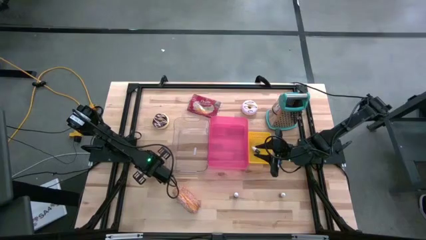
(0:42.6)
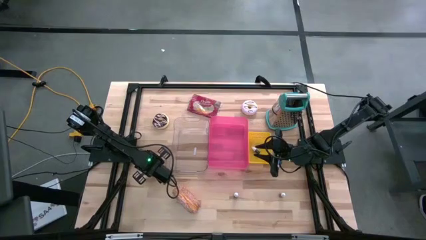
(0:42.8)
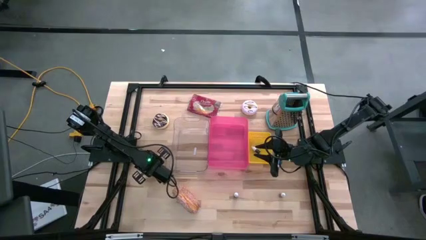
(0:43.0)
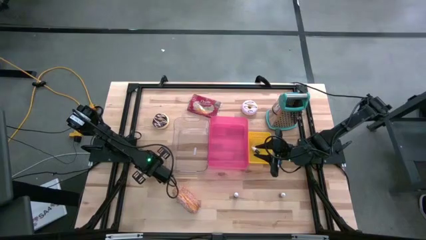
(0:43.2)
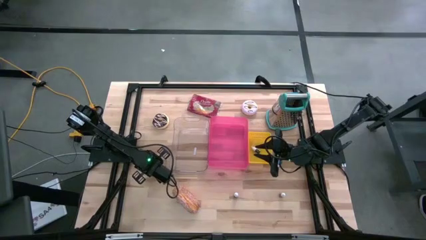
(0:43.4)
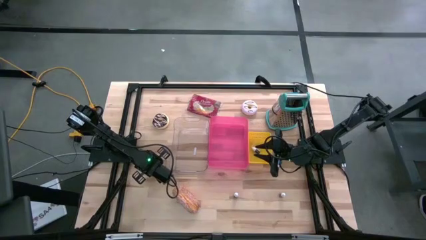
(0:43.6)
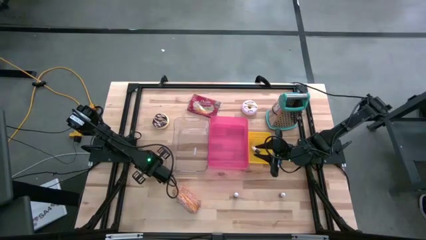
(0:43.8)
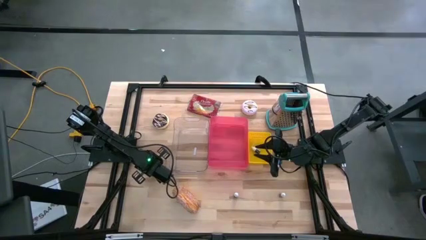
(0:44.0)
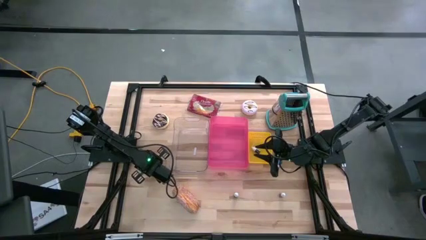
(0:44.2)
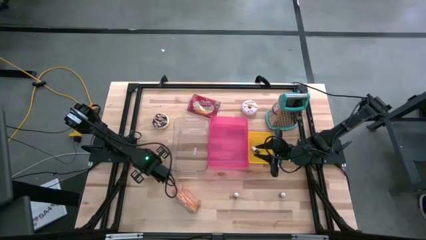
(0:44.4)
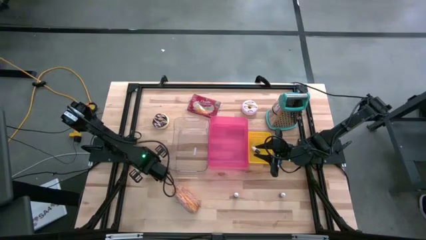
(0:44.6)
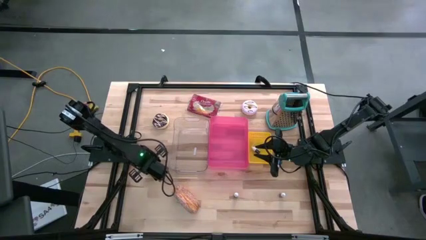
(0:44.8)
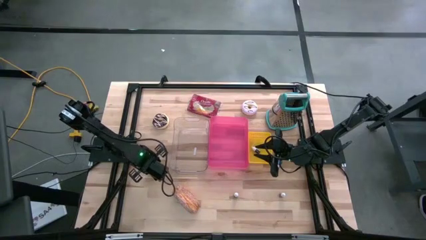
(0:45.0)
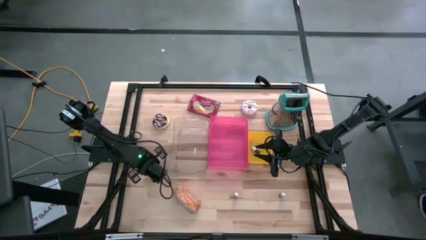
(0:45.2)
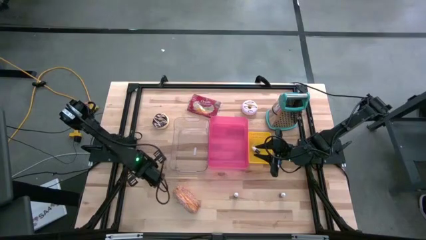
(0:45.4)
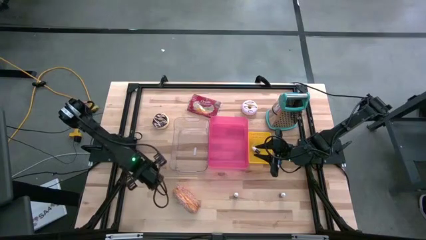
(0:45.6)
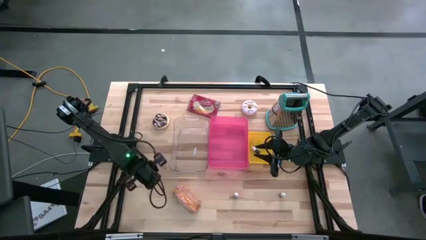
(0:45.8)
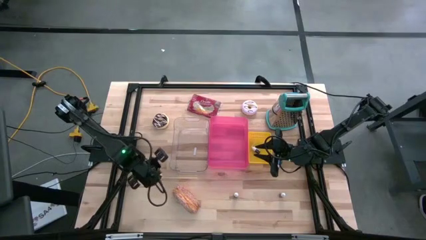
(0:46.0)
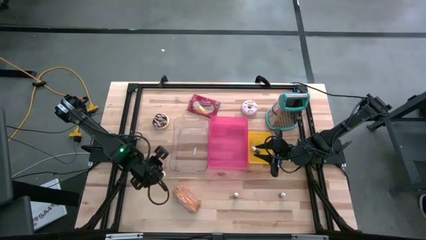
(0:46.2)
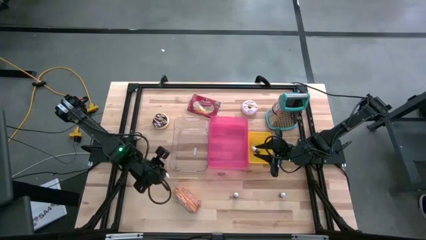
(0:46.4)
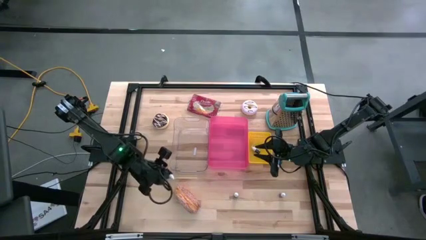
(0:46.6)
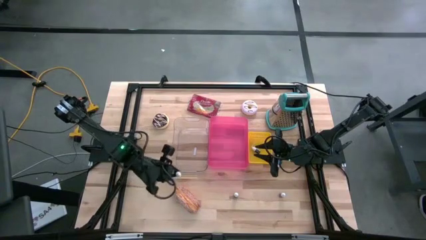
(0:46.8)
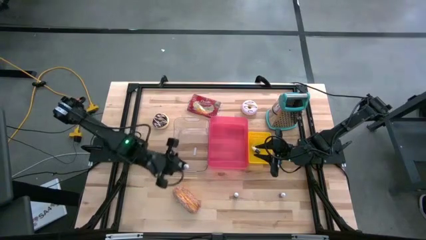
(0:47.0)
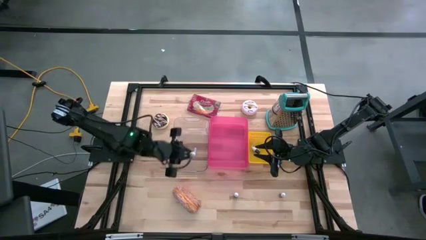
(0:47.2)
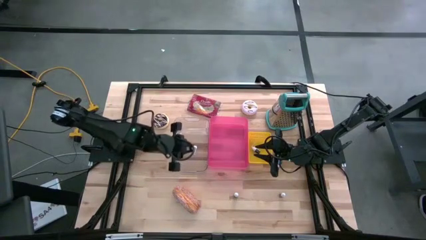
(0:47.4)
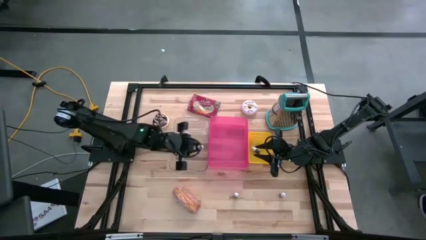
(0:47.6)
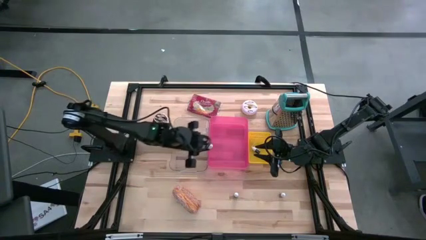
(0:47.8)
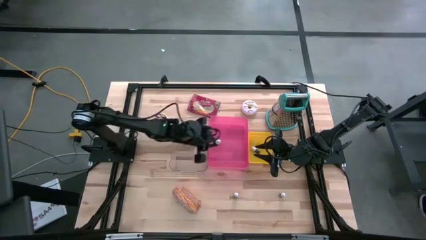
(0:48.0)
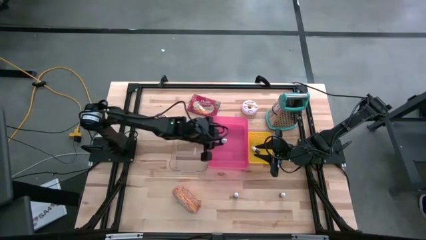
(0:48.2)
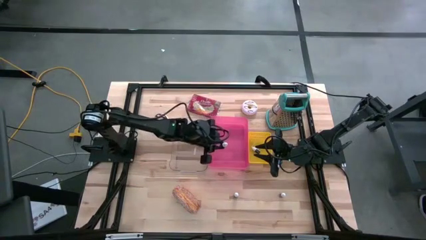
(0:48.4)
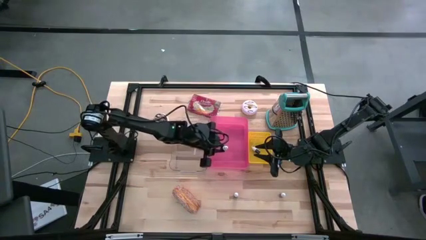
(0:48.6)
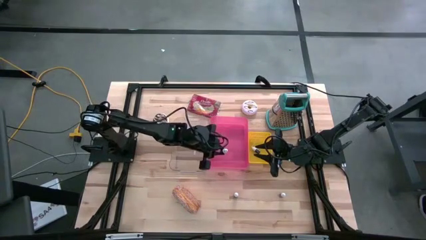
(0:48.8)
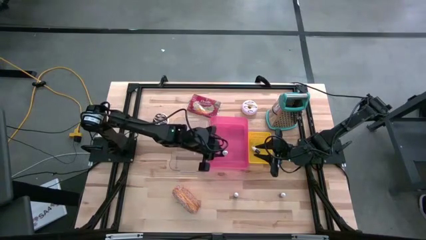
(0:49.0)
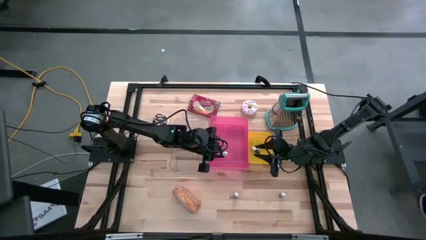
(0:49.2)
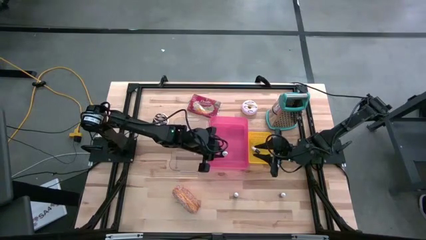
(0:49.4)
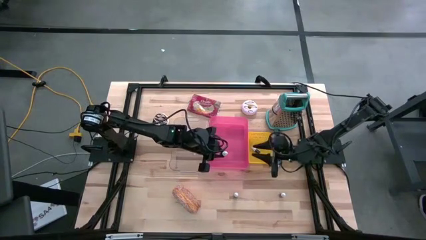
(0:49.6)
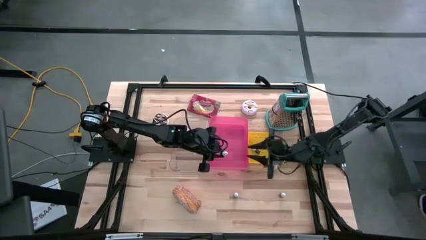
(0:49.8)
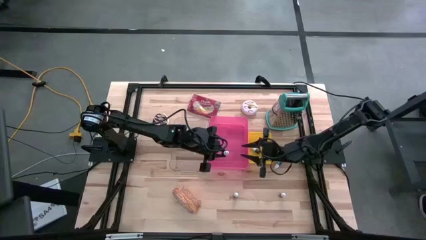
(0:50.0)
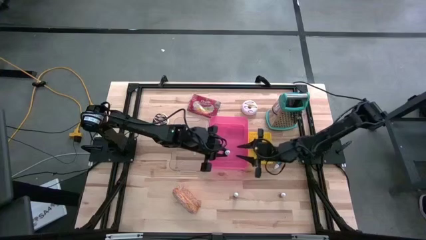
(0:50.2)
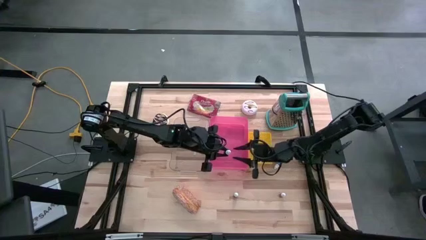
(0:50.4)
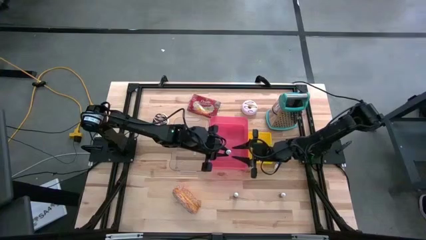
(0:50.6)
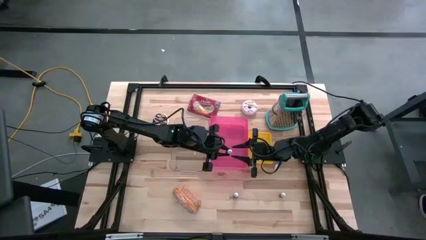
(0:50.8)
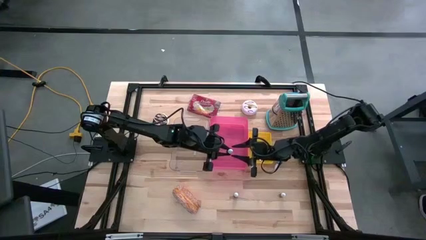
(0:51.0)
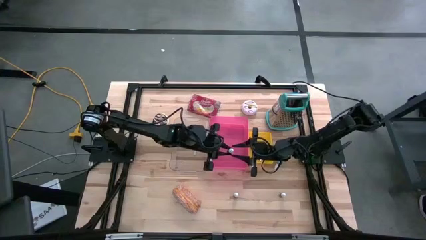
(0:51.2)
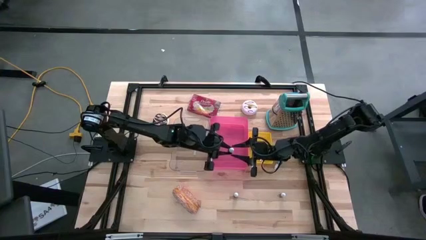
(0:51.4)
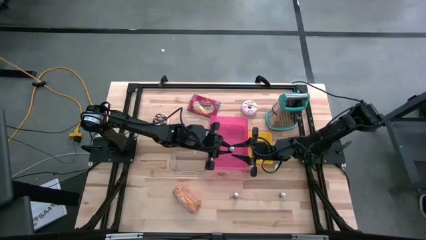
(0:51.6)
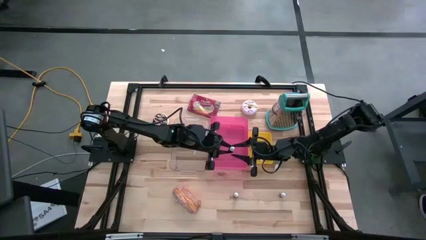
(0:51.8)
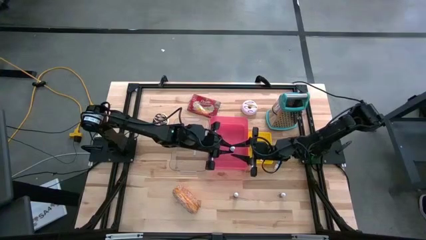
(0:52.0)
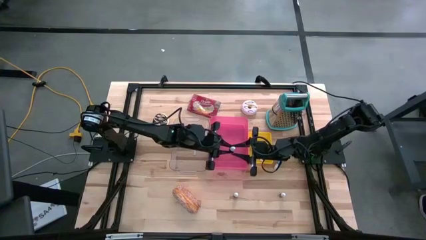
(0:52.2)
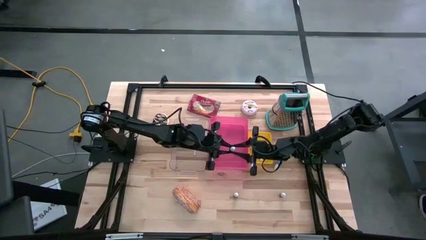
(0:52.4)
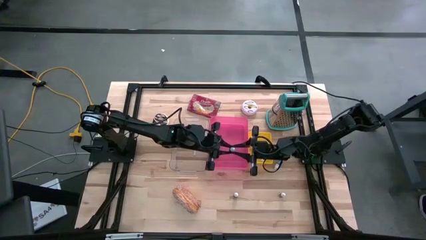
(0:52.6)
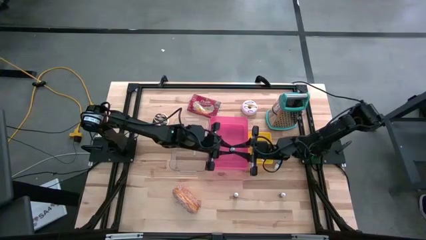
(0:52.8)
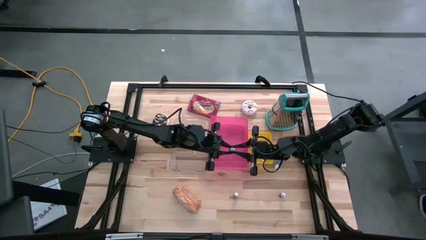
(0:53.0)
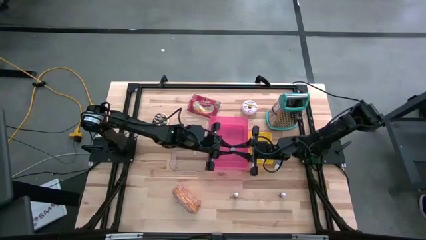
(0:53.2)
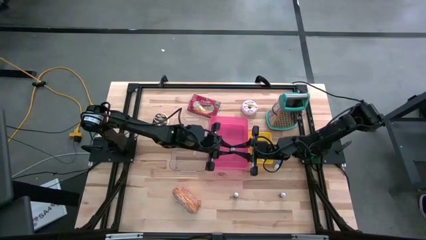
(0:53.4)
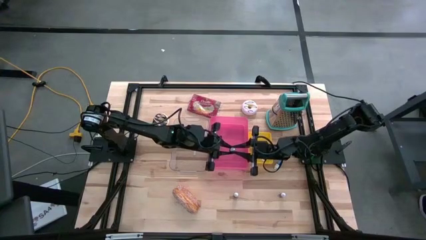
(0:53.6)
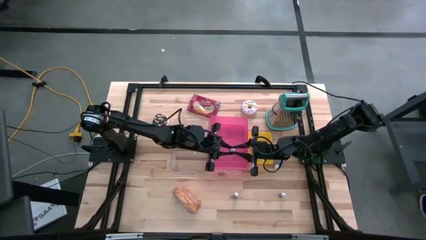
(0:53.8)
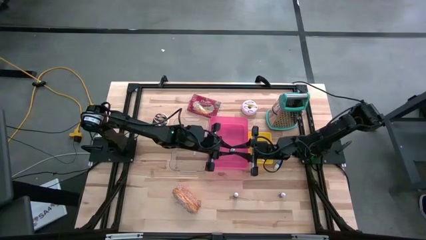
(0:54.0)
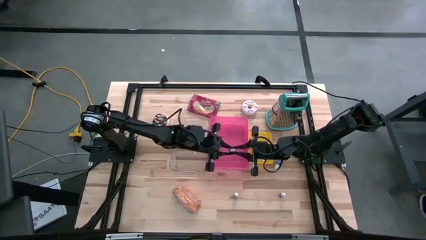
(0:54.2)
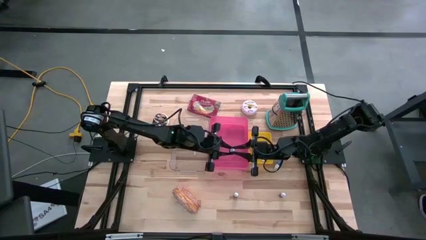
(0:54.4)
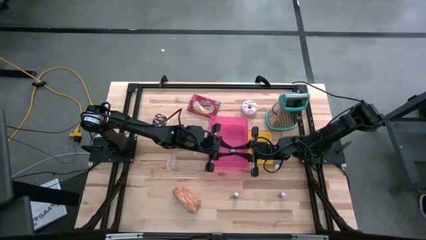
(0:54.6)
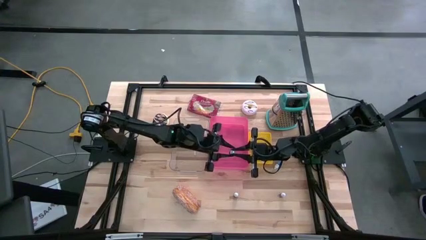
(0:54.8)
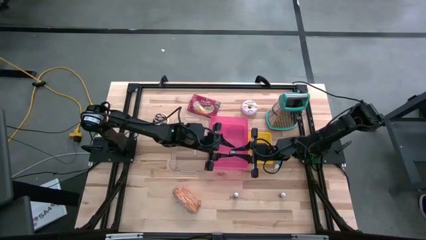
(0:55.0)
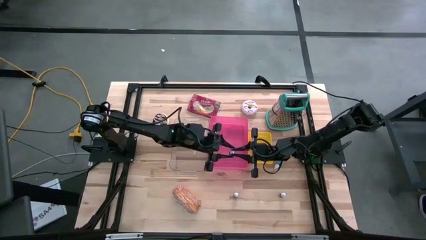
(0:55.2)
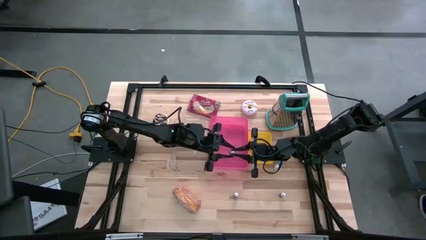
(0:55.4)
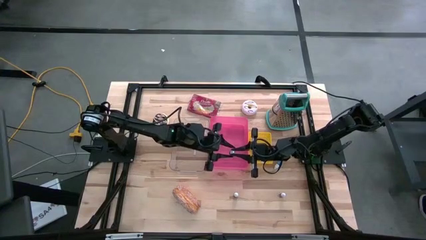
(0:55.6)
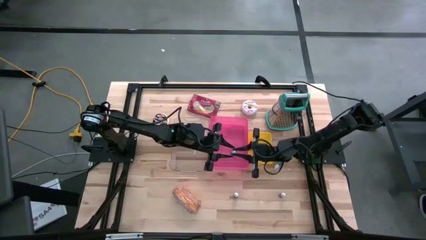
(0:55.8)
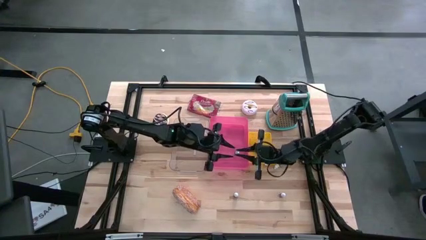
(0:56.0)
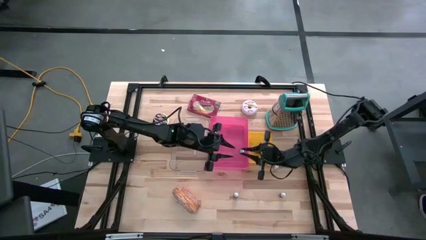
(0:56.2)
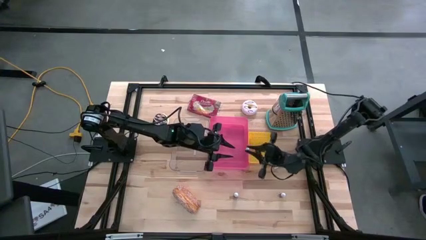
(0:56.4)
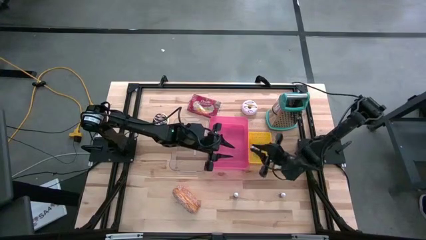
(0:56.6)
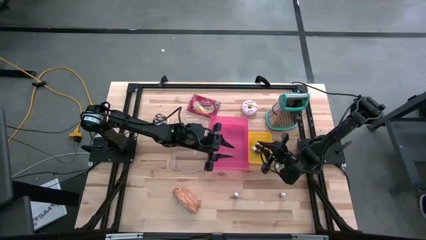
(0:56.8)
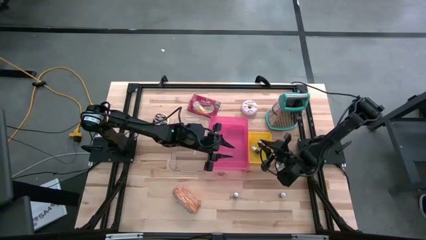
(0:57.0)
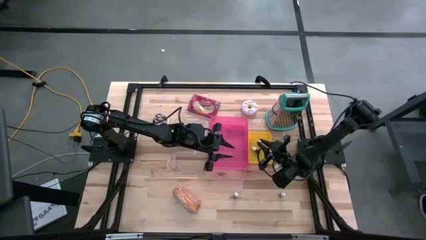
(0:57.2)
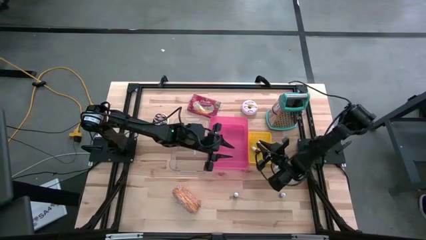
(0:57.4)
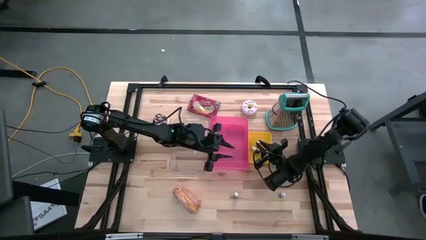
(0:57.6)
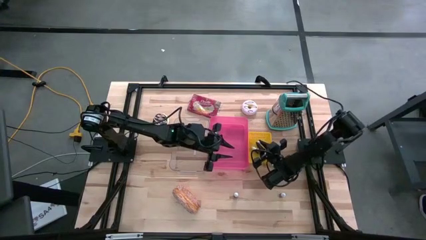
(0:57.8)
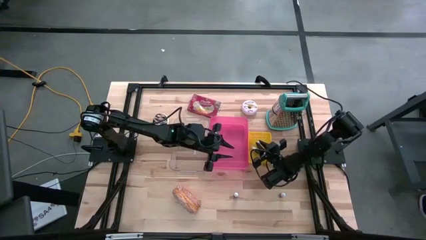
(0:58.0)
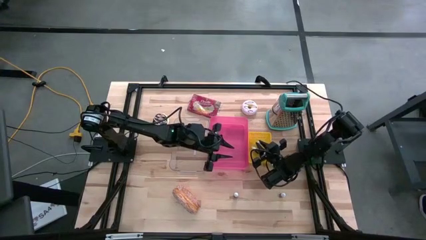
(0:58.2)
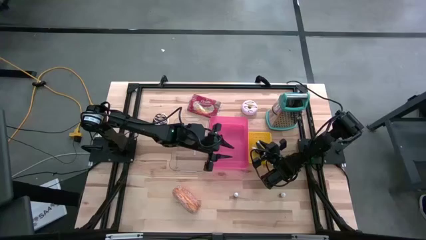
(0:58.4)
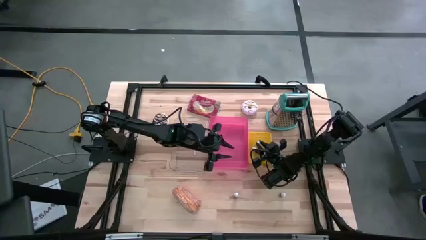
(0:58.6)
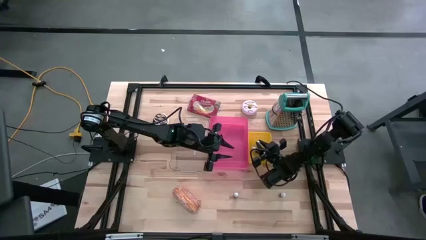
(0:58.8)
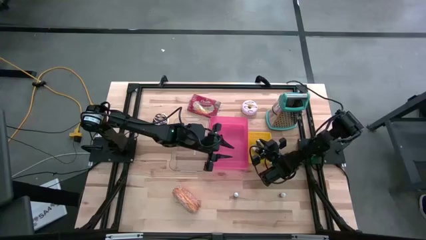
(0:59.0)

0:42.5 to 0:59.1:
Put the black food coloring bottle into the yellow bin
